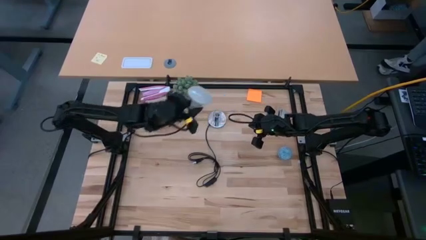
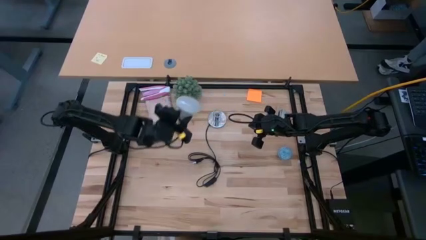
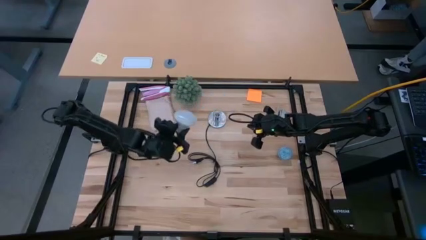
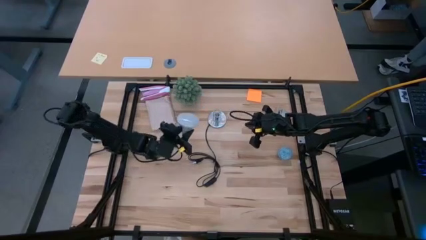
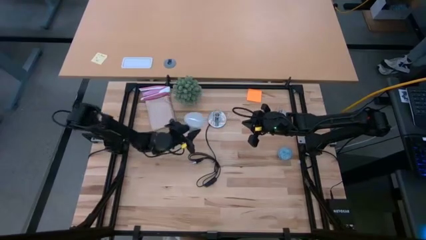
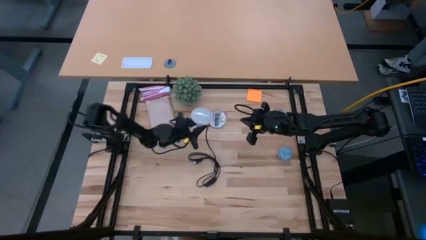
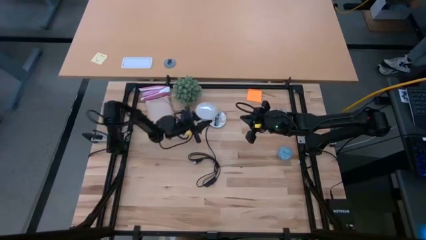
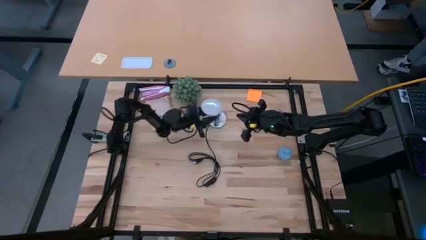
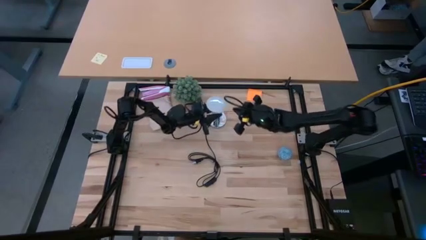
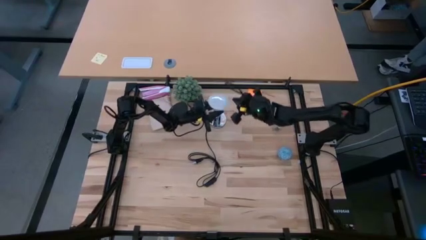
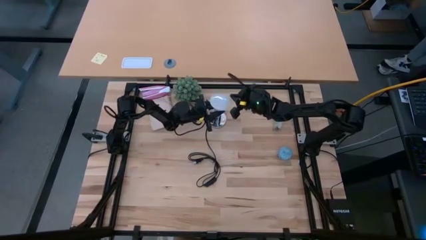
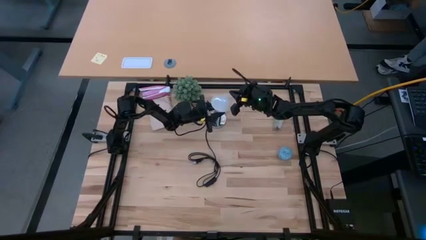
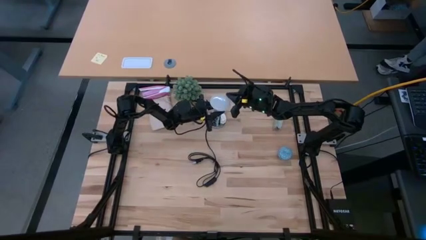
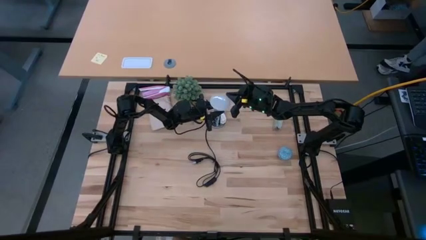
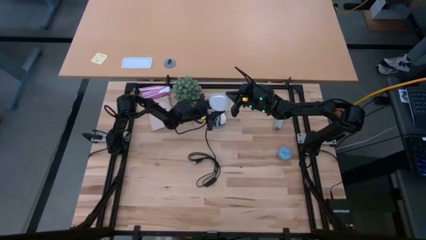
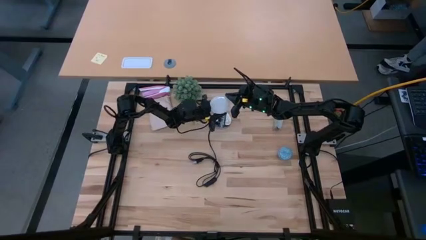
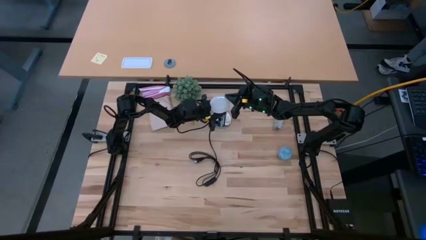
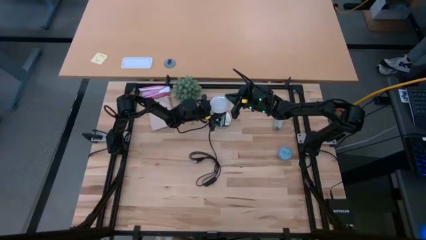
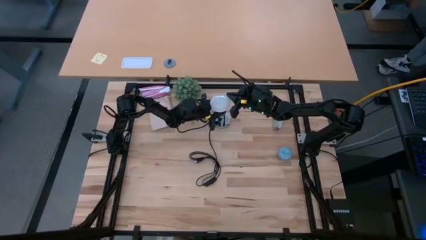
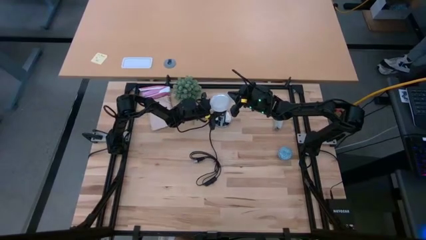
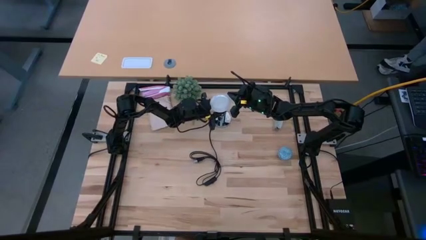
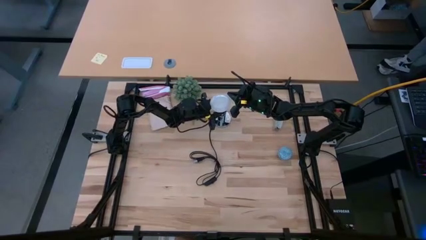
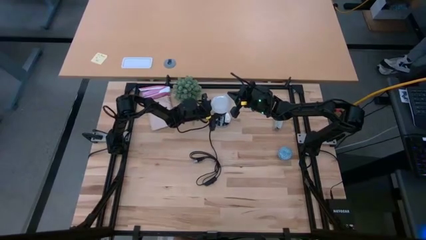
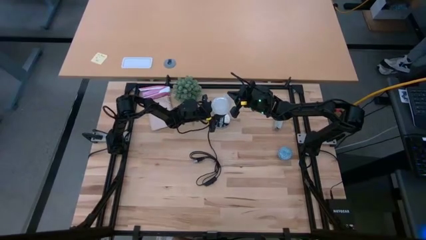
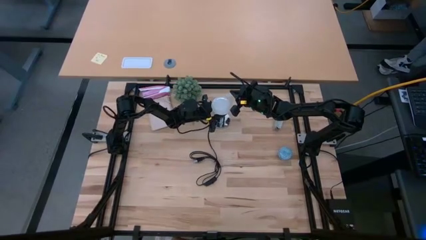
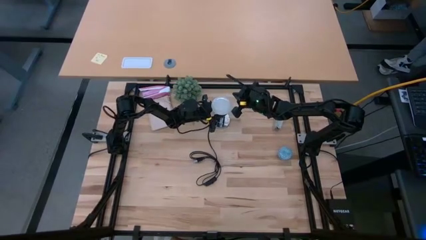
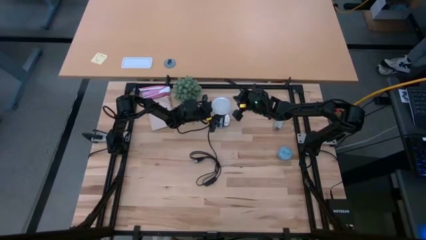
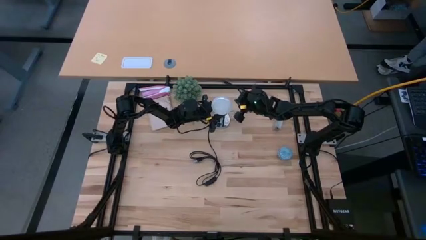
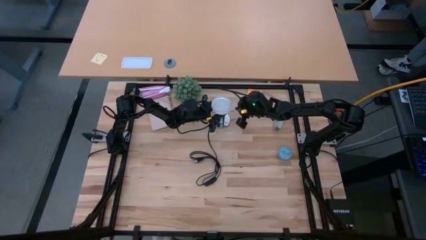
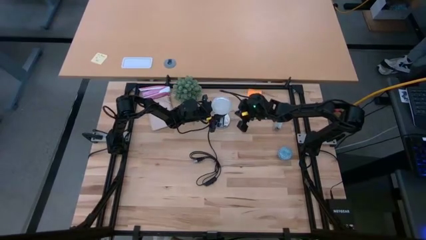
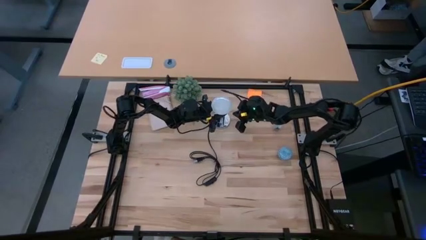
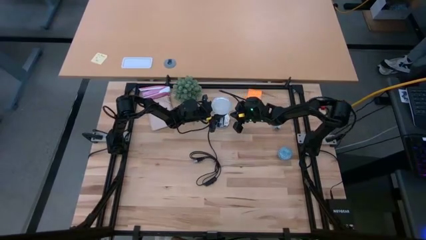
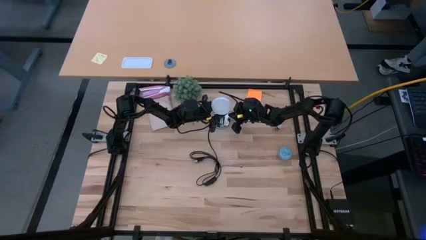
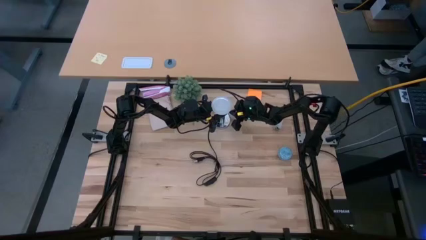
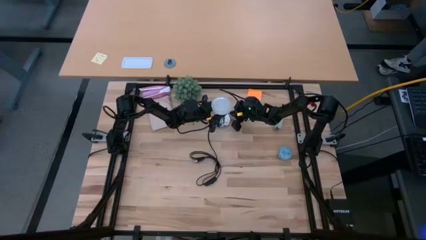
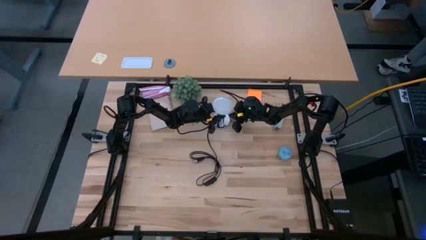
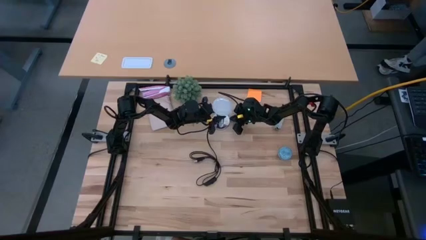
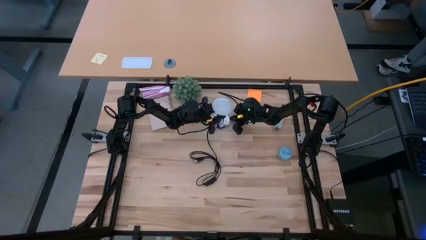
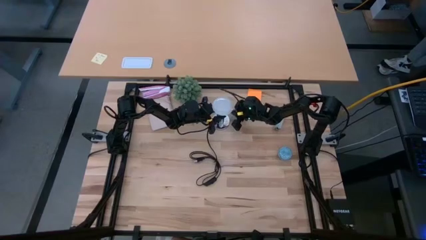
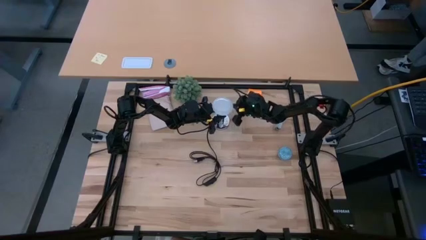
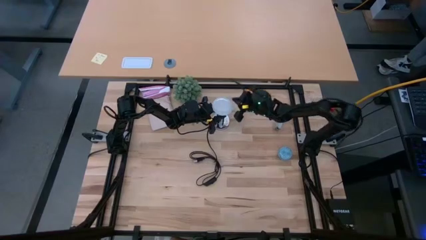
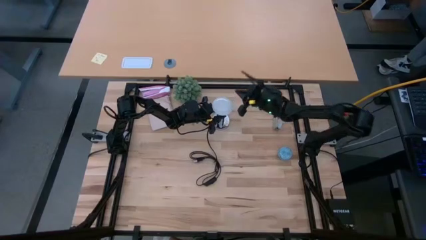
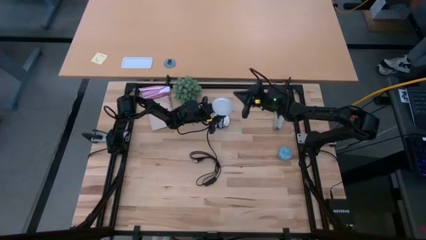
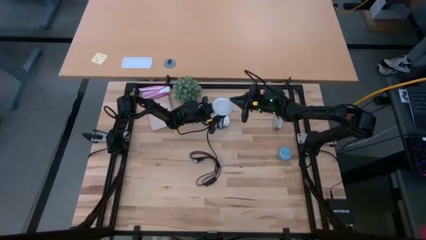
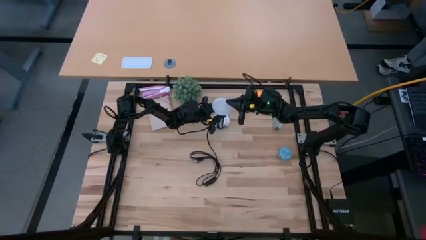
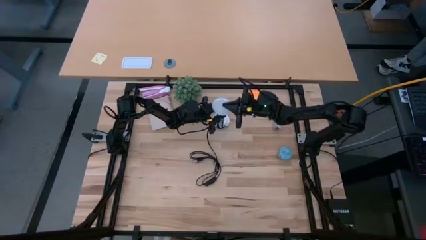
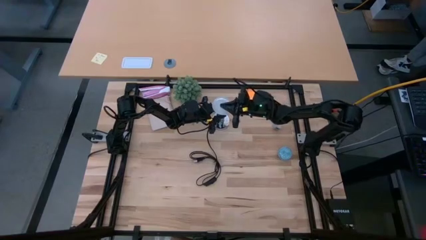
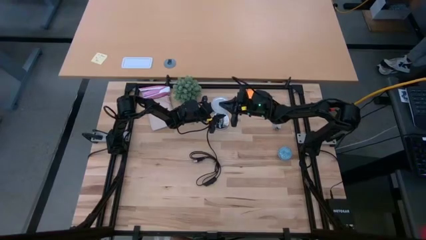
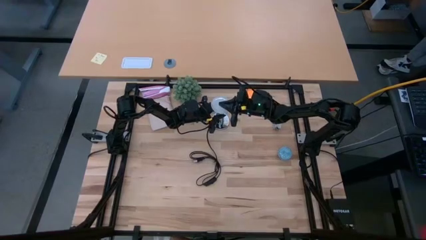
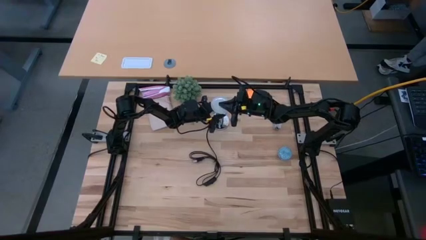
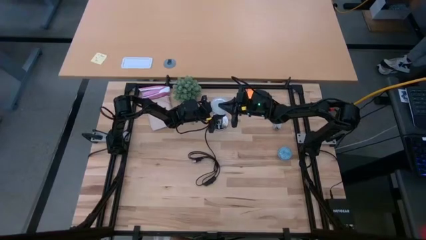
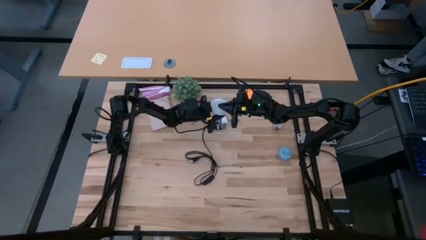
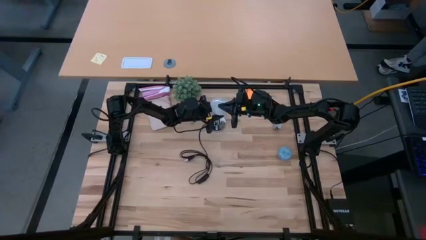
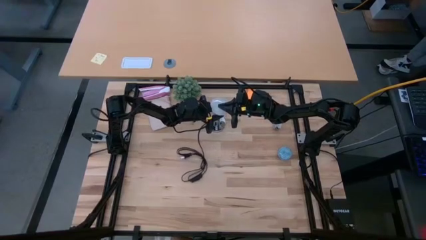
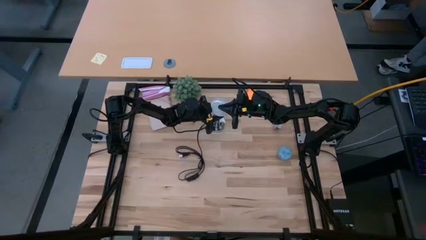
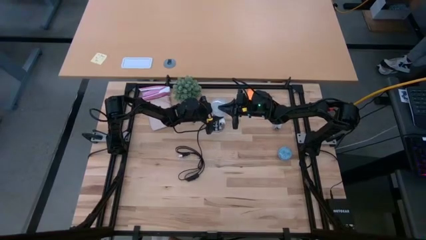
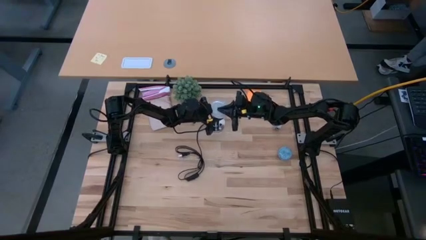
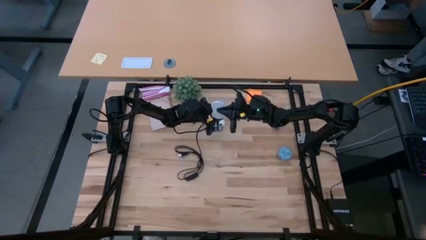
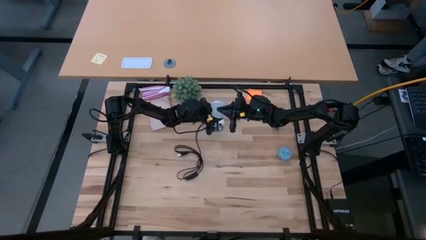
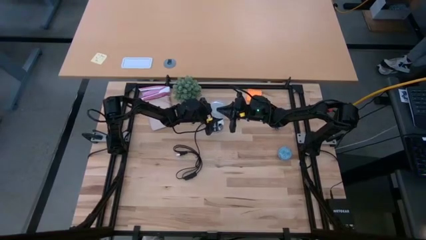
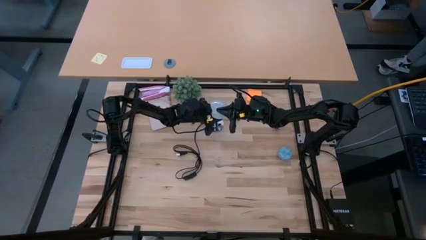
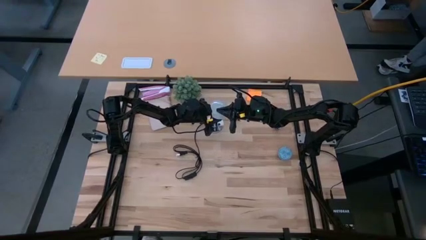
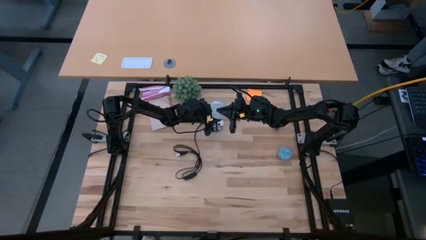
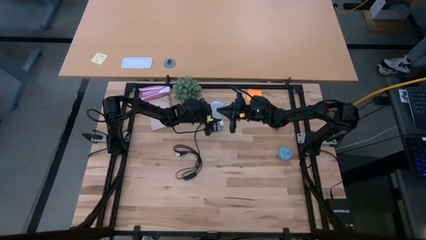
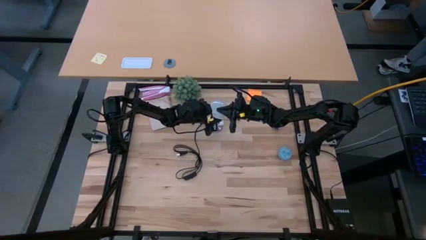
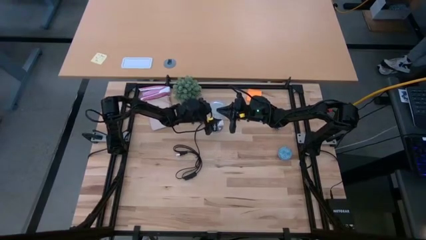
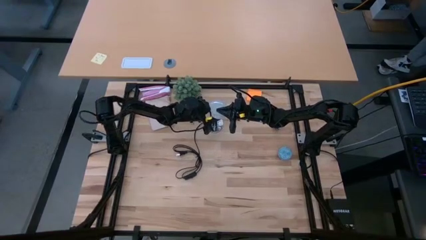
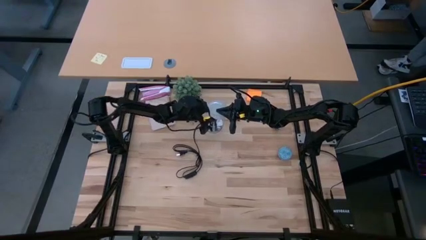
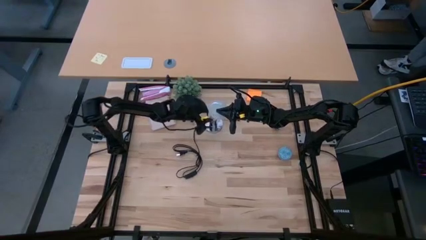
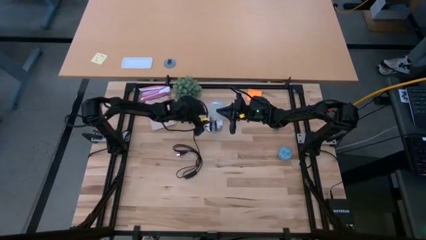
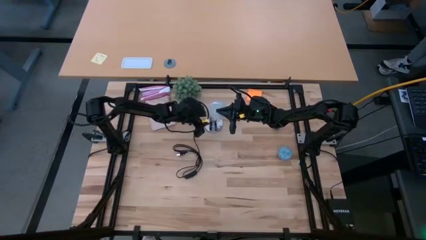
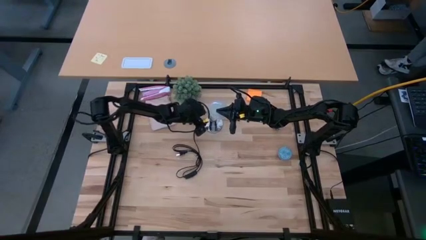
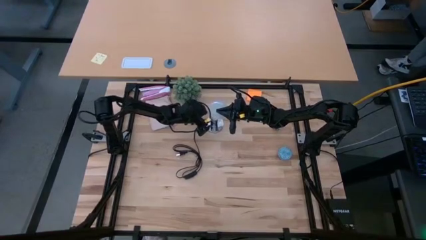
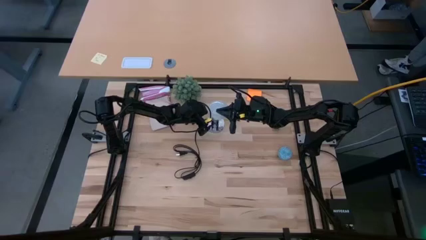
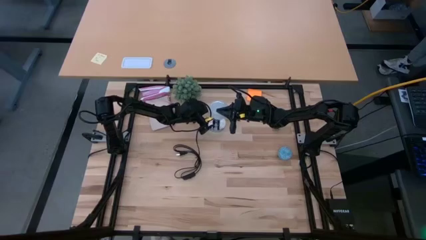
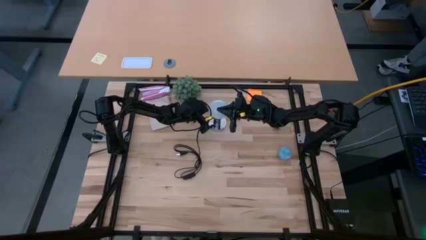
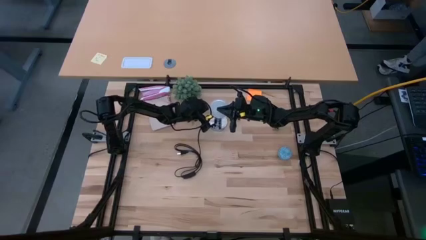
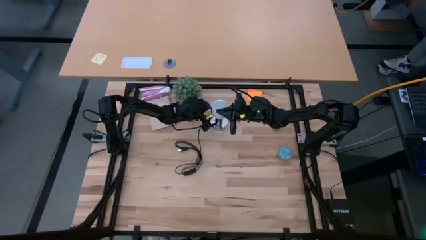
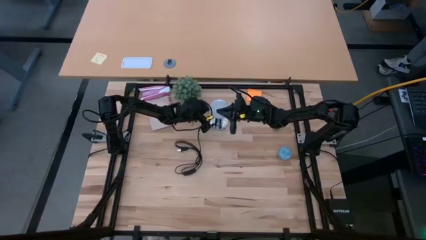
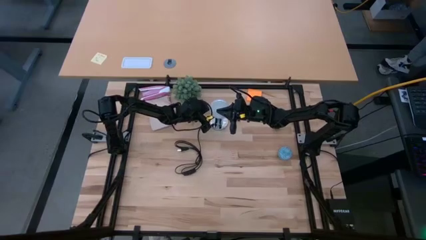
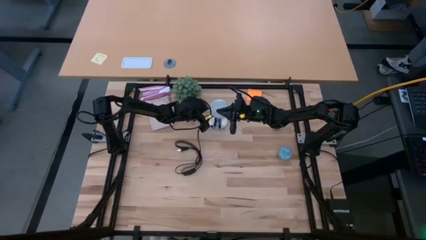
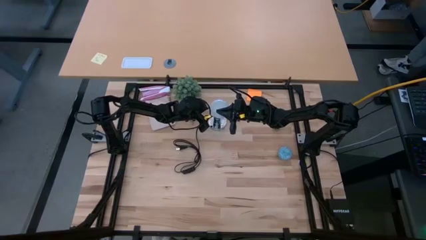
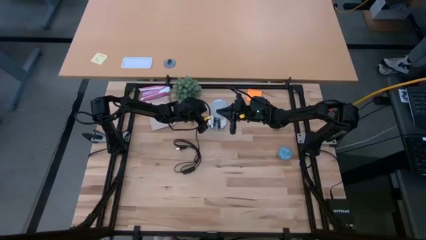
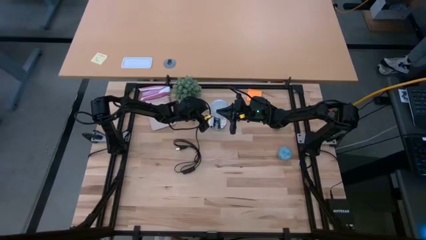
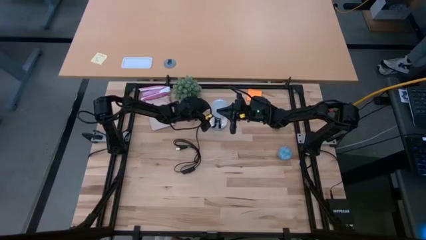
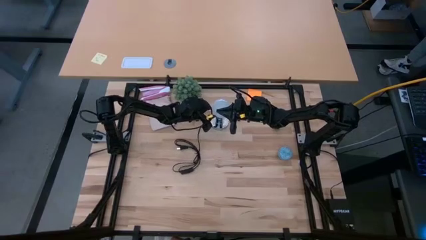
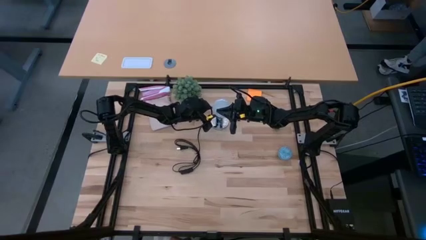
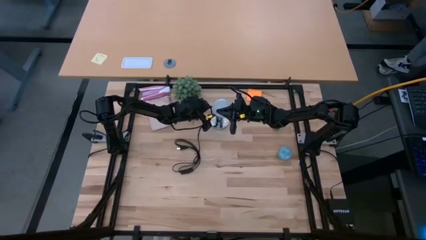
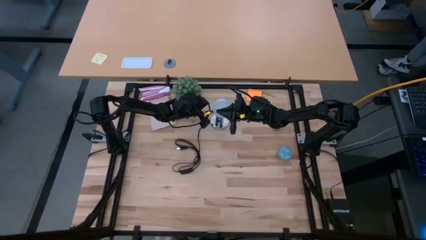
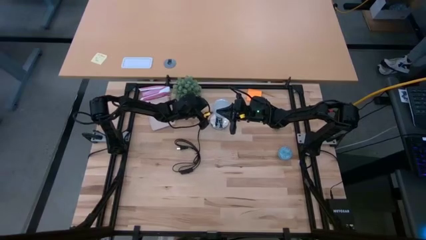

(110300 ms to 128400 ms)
Task: Screw lightbulb
Insert the lightbulb into the lamp
